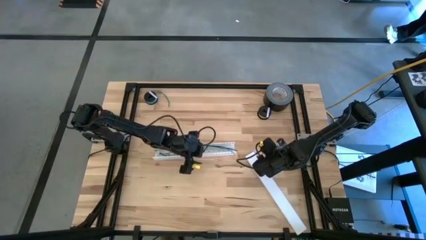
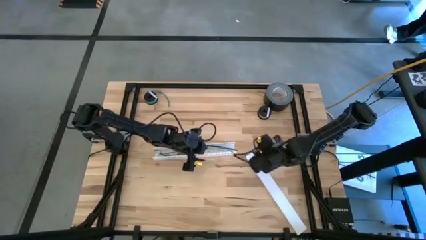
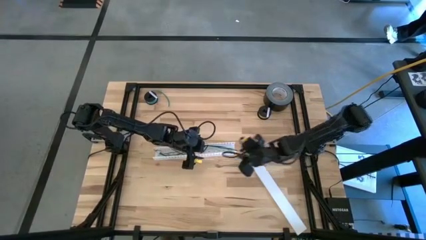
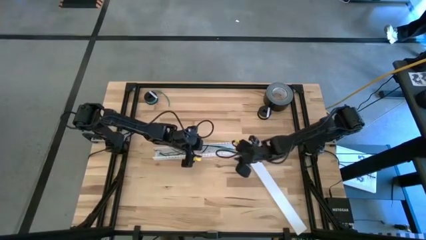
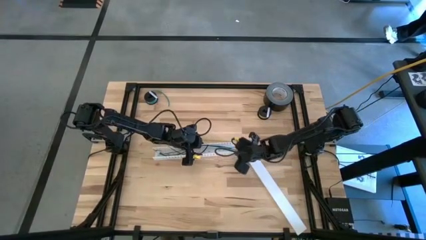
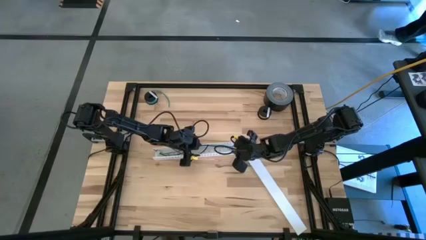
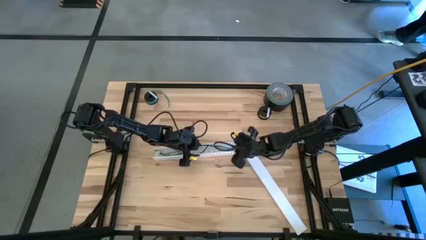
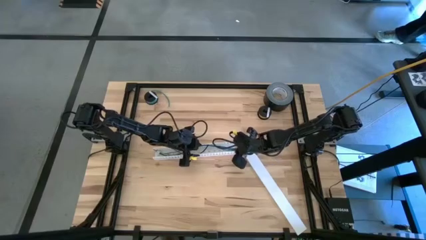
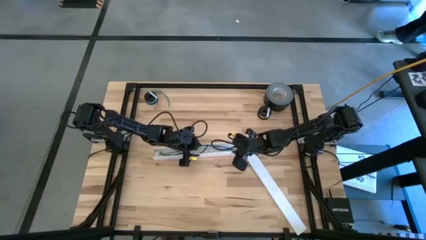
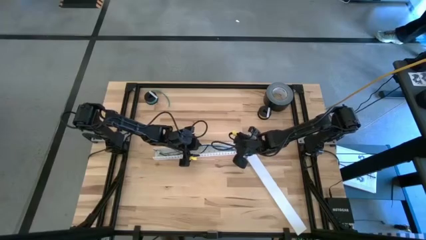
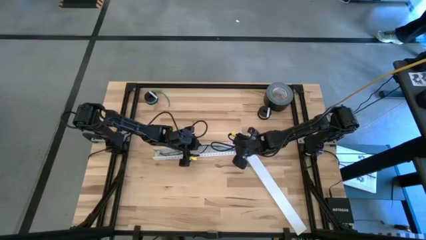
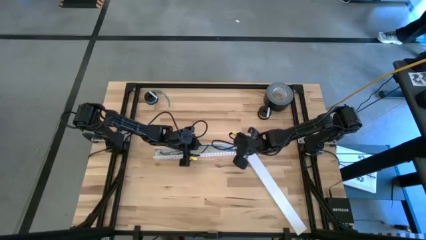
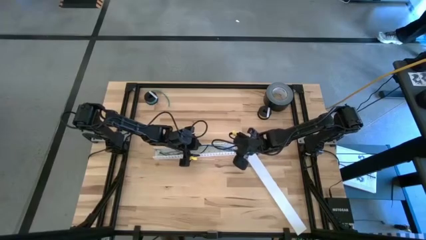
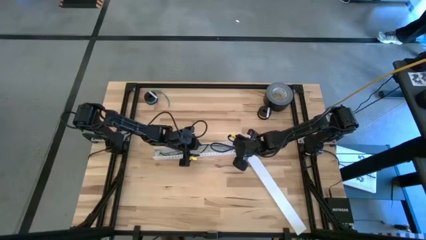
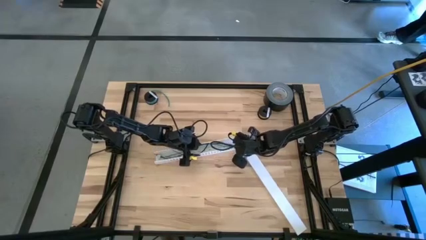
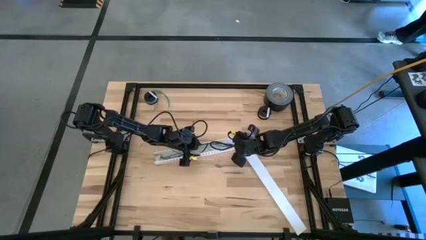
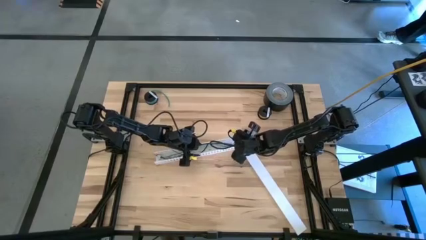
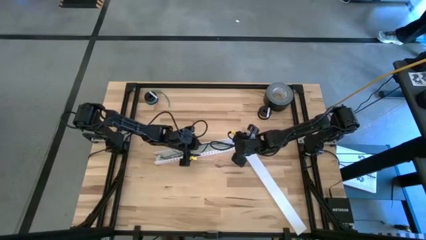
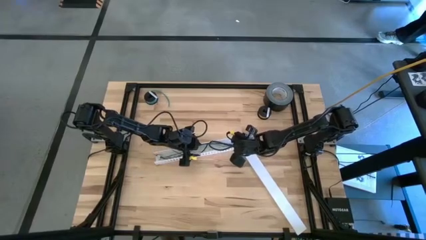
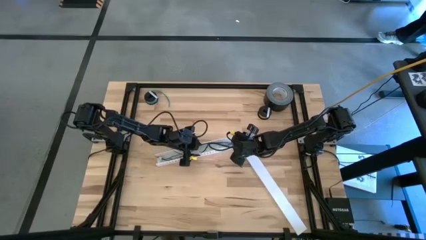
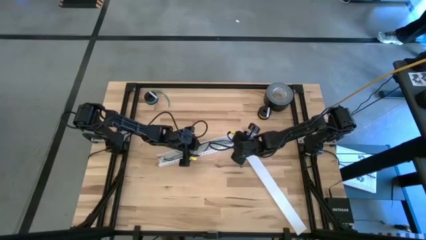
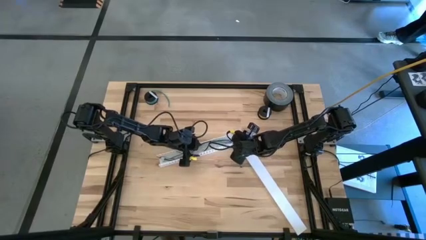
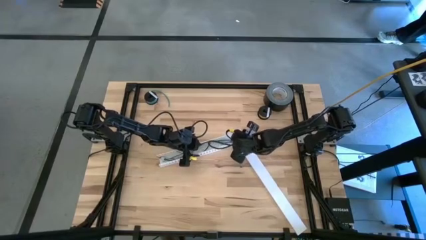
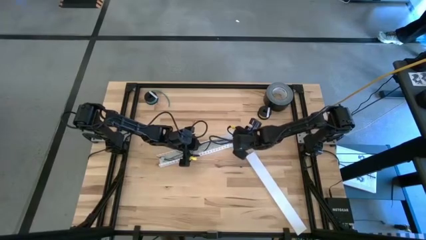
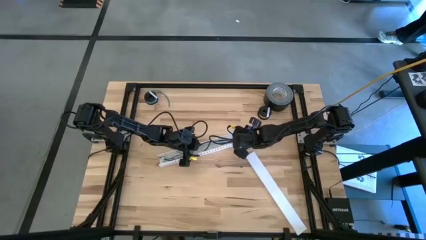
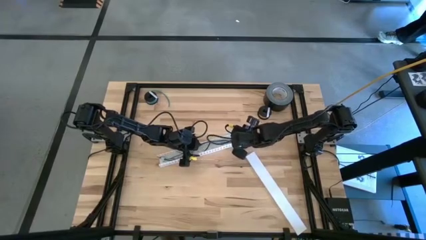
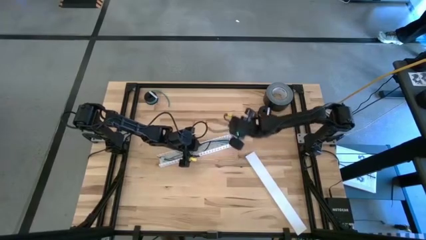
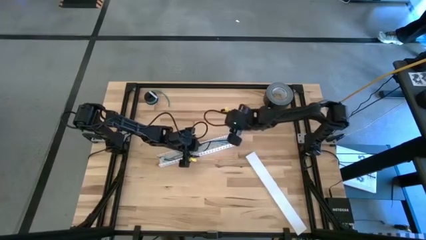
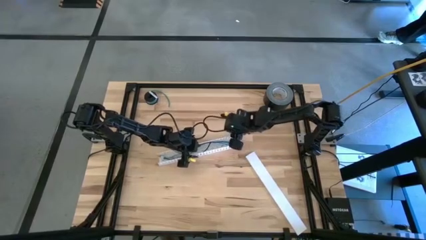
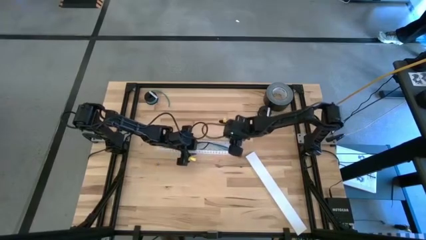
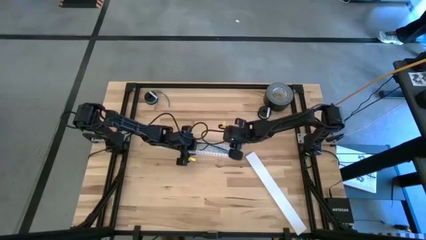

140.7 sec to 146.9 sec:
Task: Ziptie cables
Adjust the white cable duct on the table

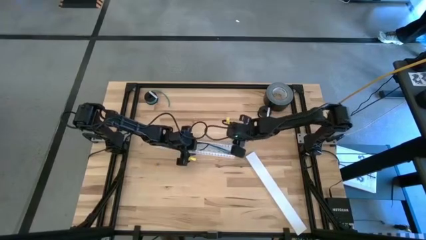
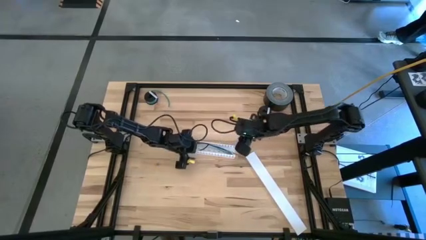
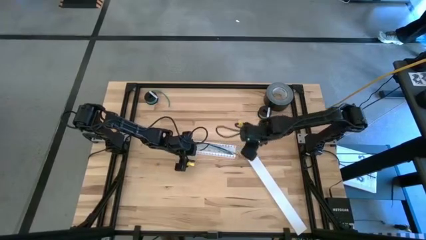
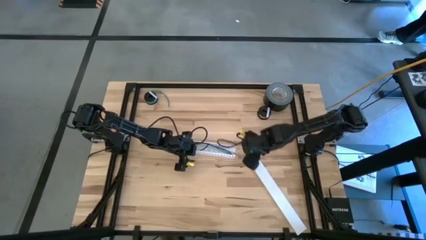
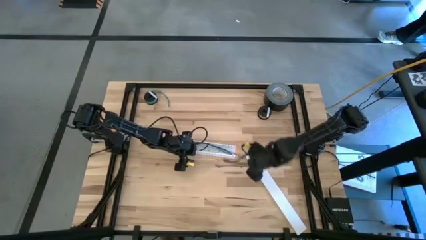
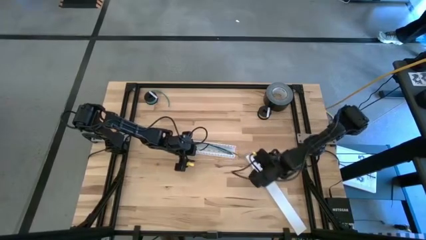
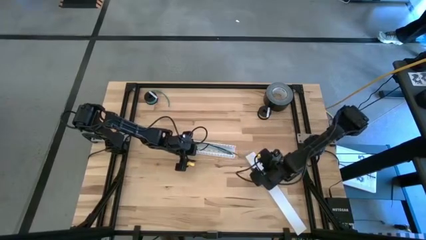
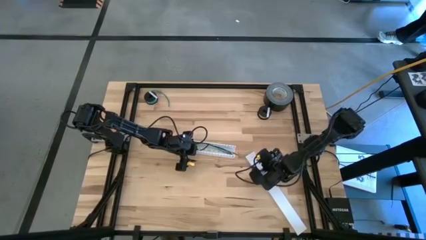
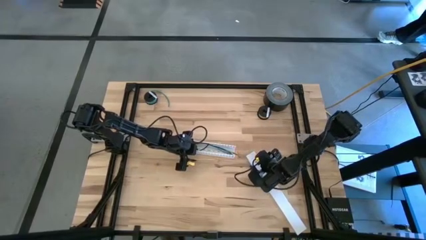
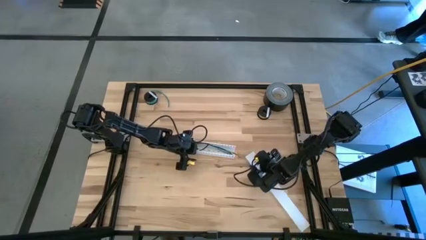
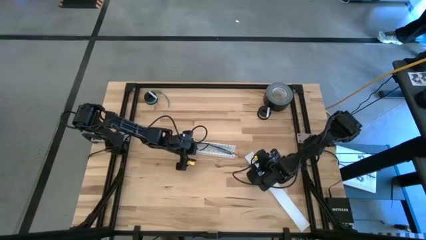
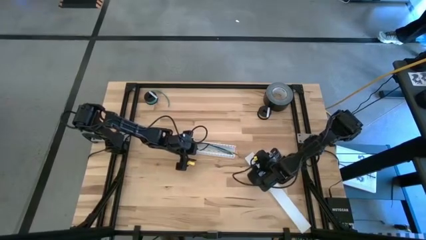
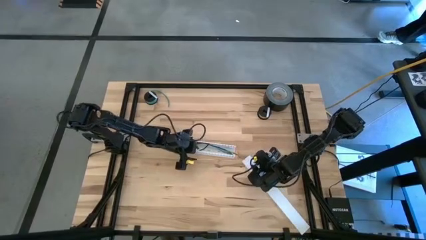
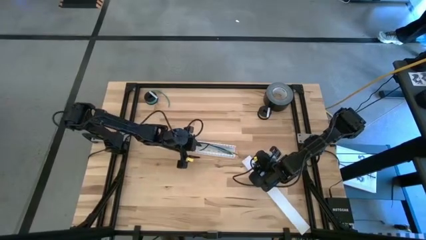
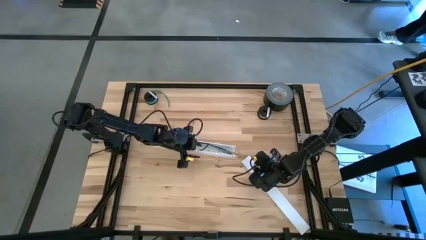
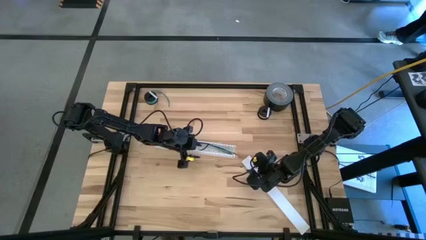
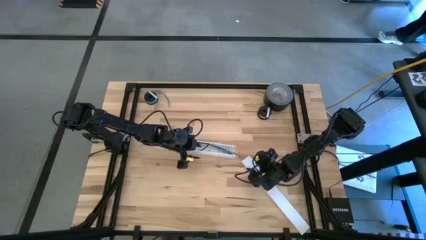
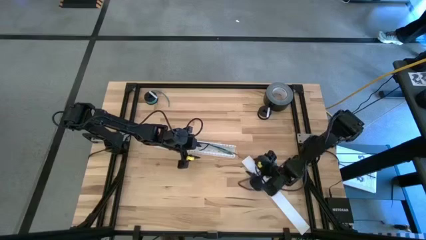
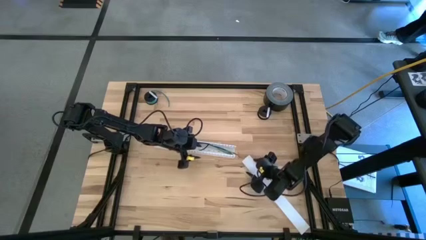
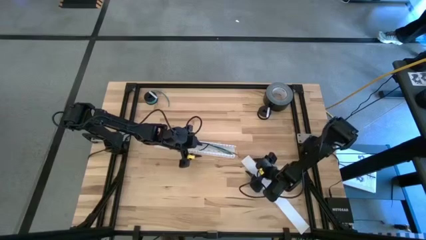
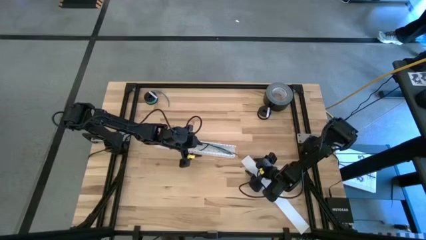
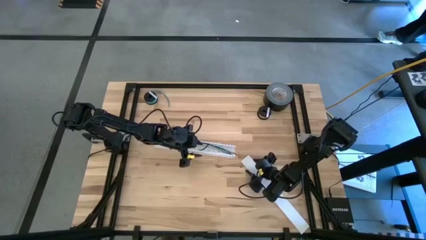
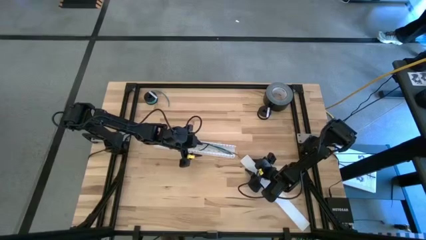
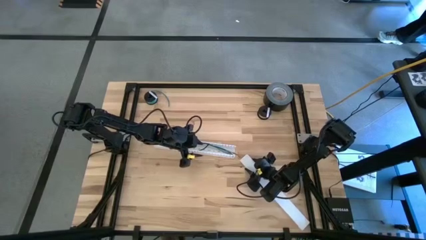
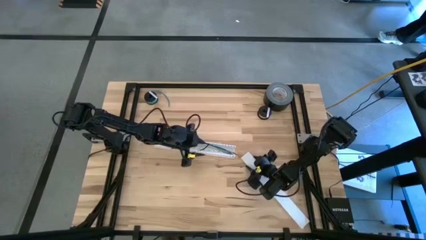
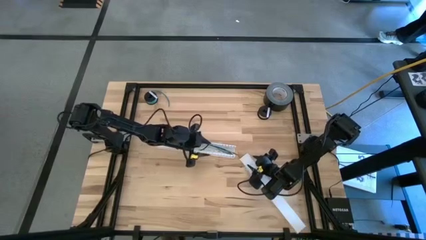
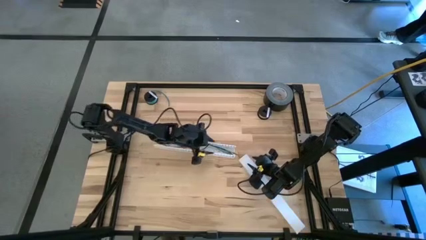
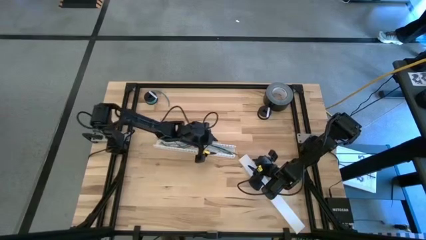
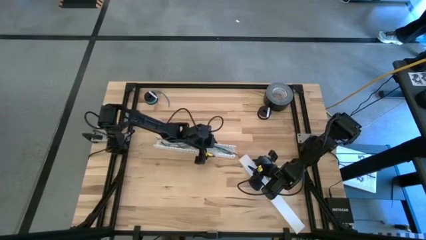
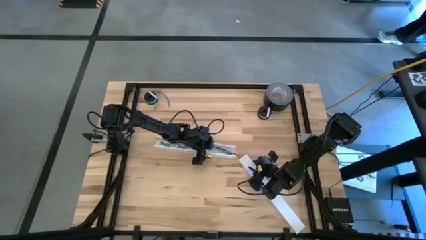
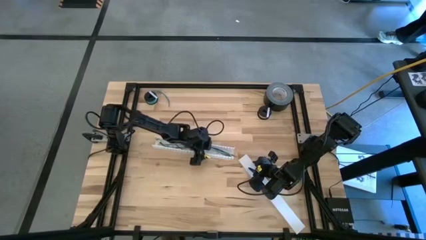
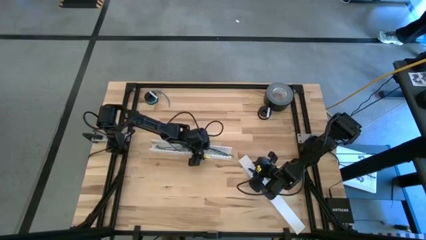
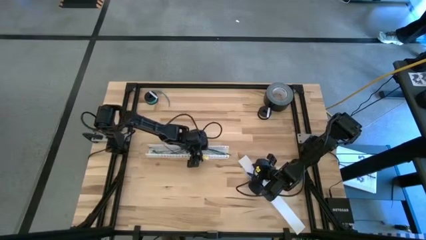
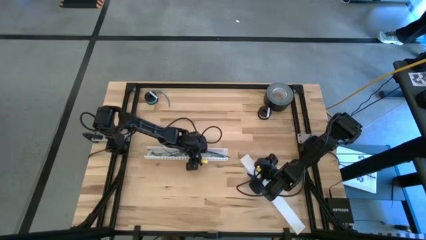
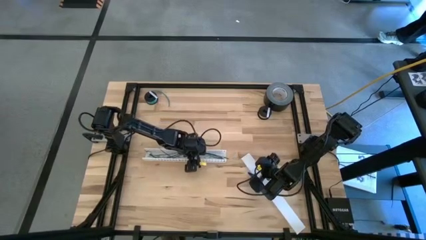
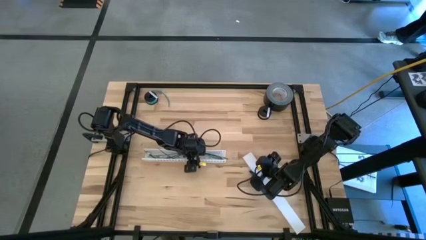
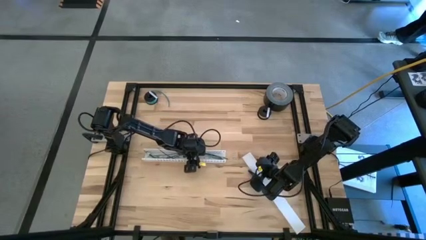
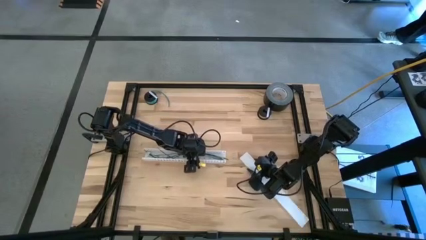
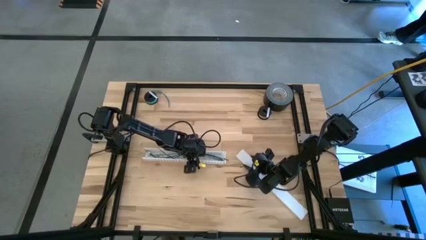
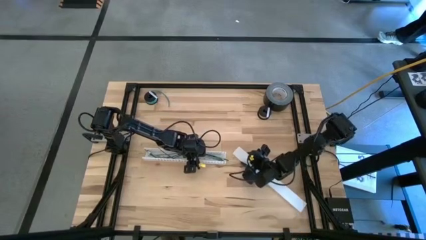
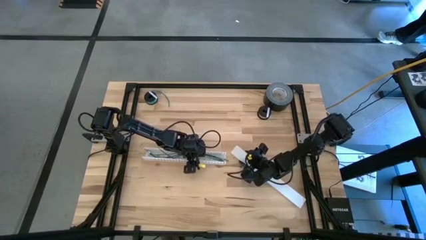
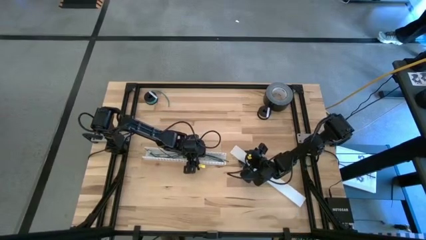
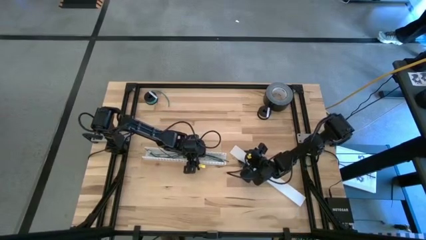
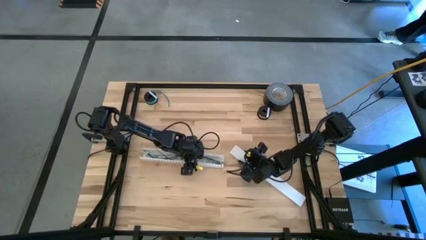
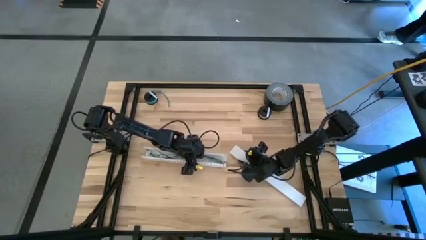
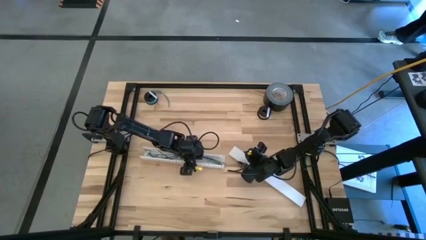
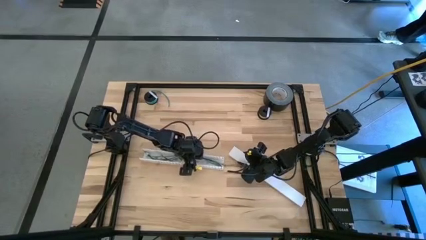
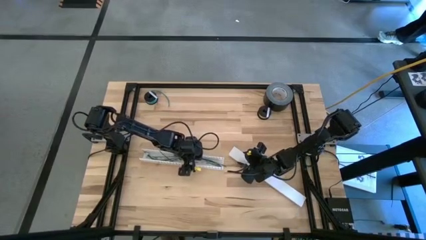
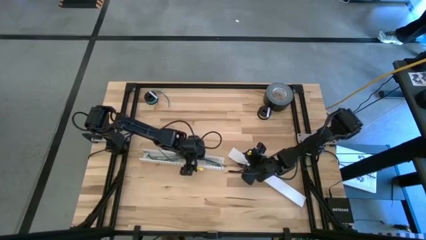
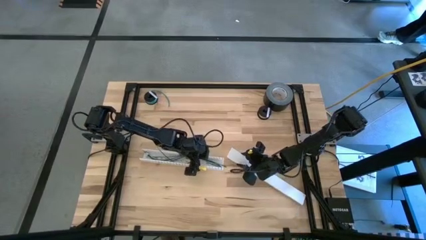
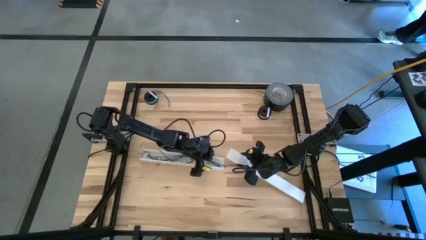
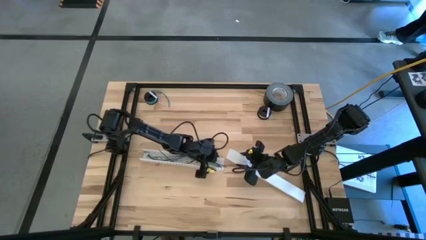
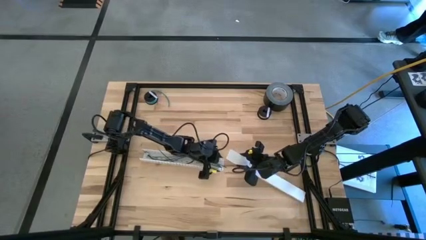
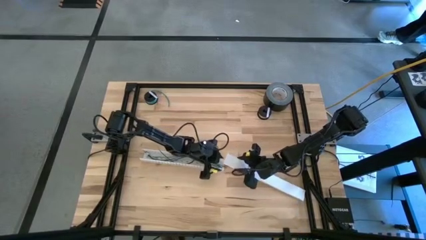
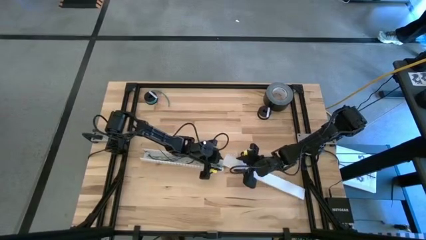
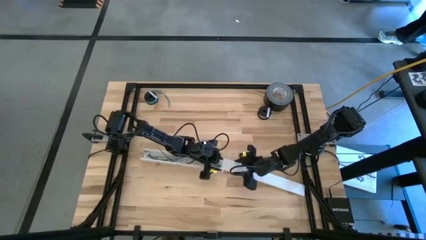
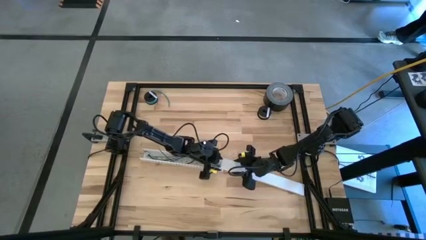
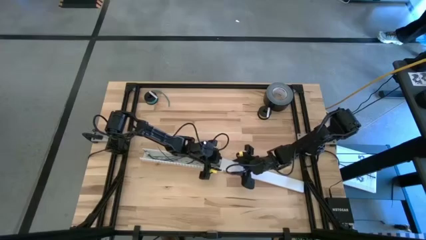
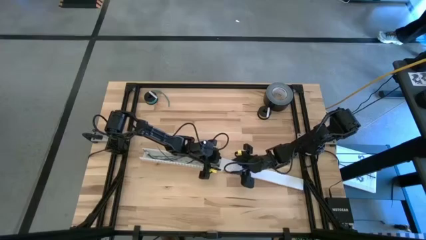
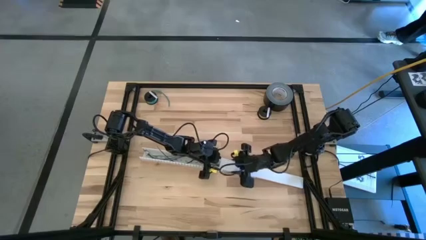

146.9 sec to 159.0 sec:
Close the white cable duct
